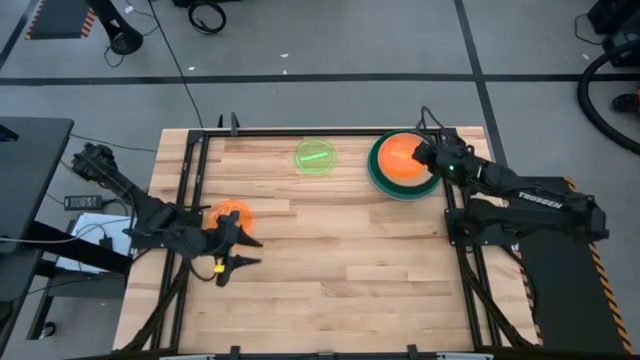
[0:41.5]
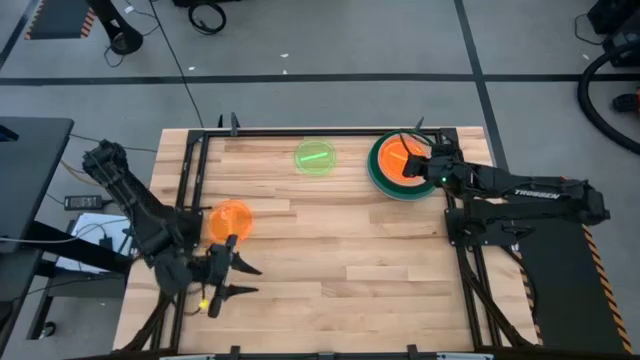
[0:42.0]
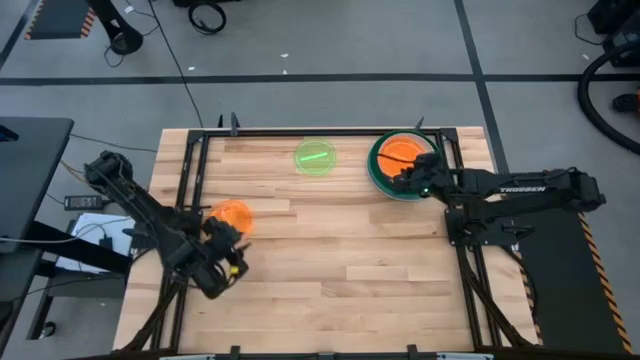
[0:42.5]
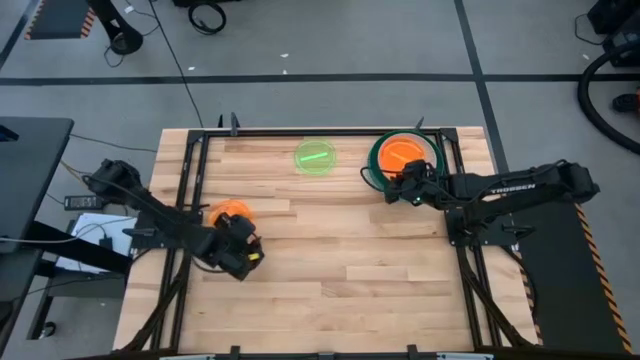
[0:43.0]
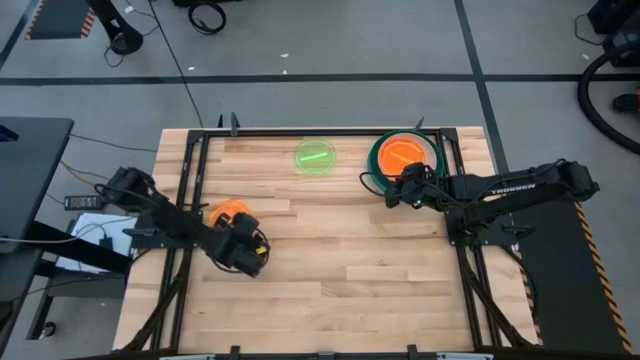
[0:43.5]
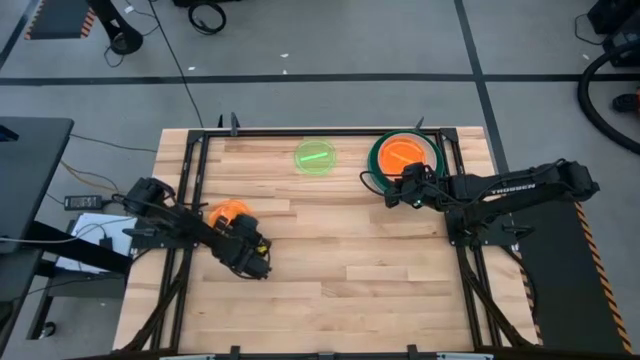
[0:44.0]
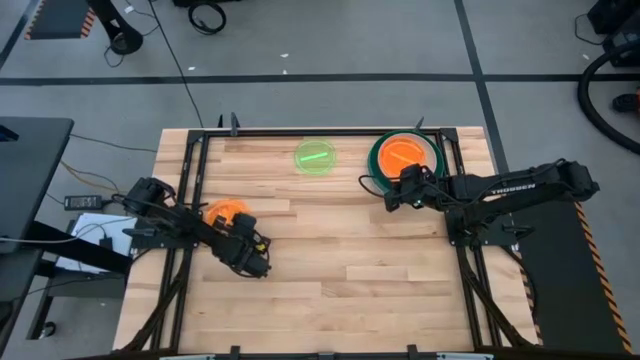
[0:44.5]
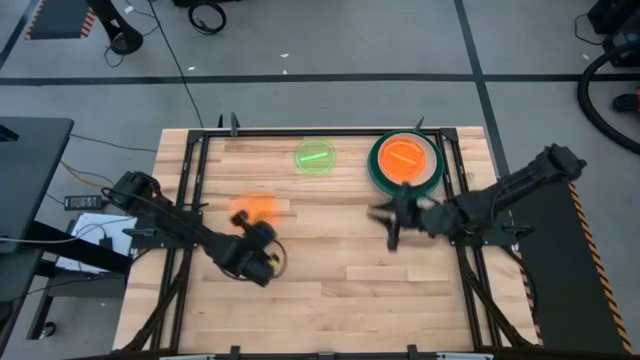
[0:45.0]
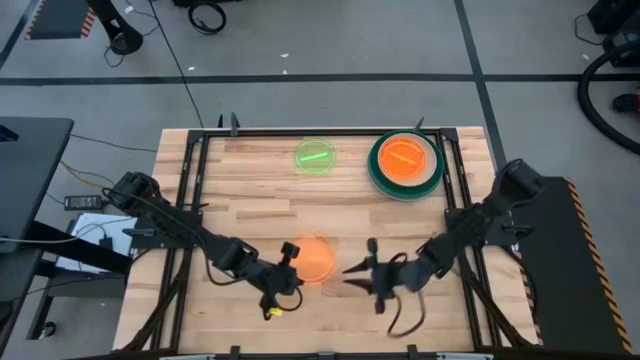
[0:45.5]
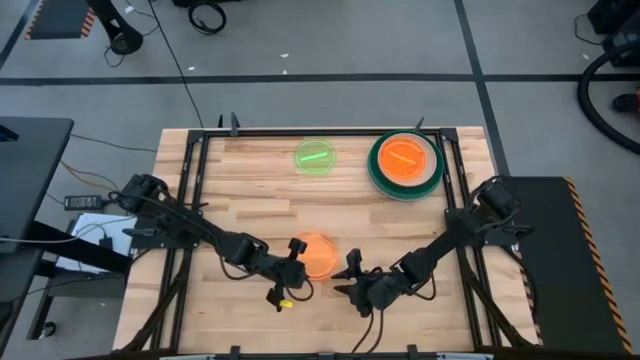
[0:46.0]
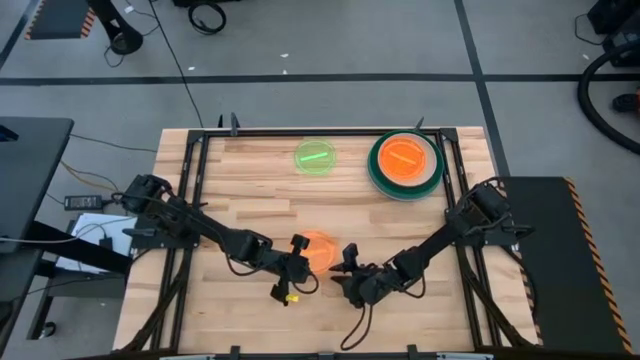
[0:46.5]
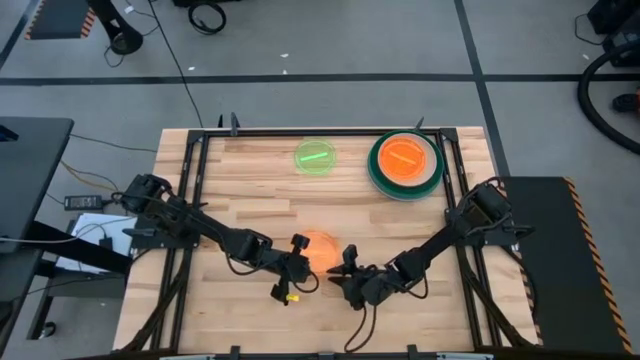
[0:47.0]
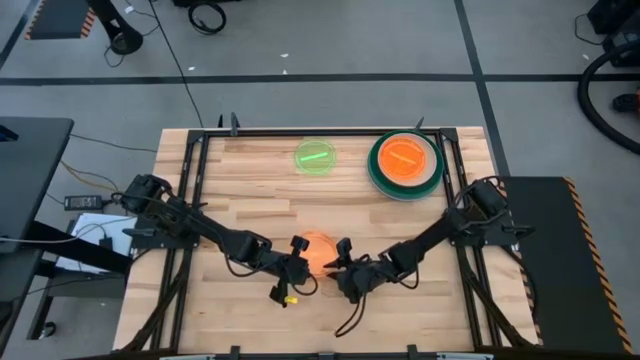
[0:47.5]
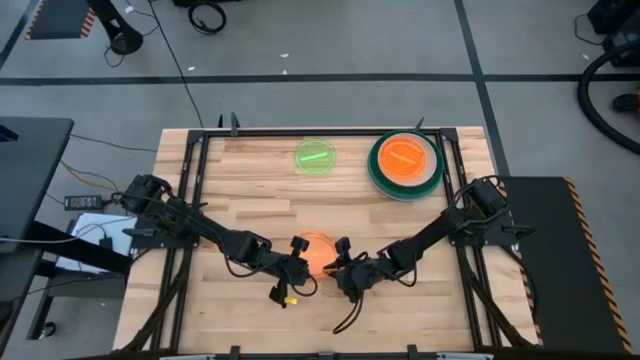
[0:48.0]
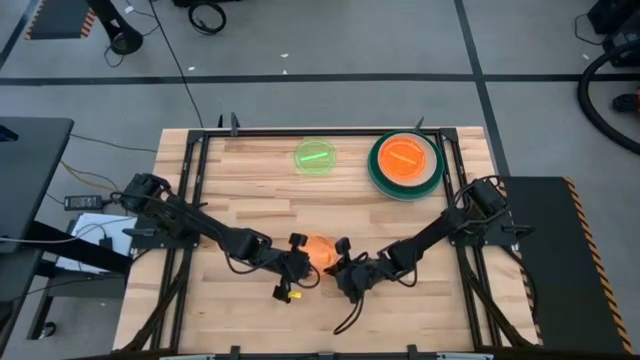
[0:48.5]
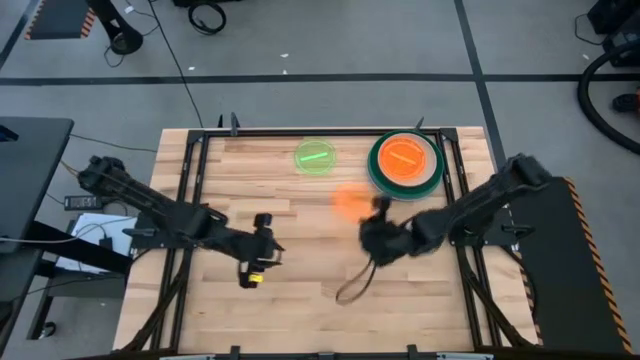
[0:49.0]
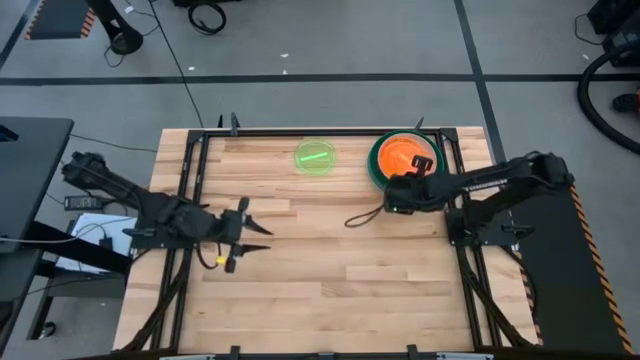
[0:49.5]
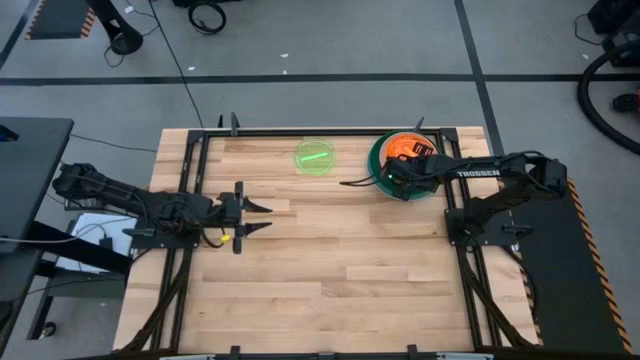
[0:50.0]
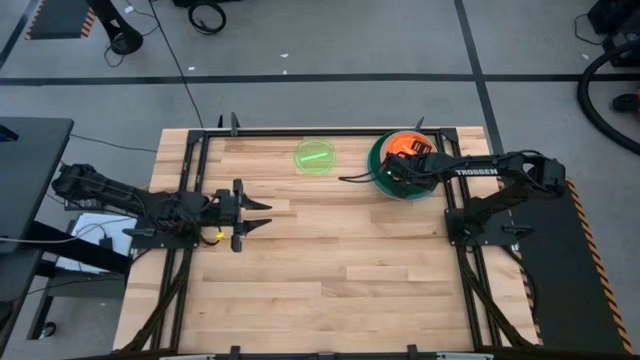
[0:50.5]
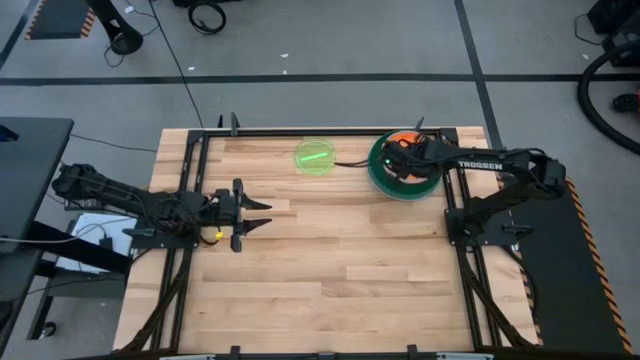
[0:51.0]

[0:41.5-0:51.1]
Task: Stack plastic plates
Stack the left light orange plate on top of the right light orange plate

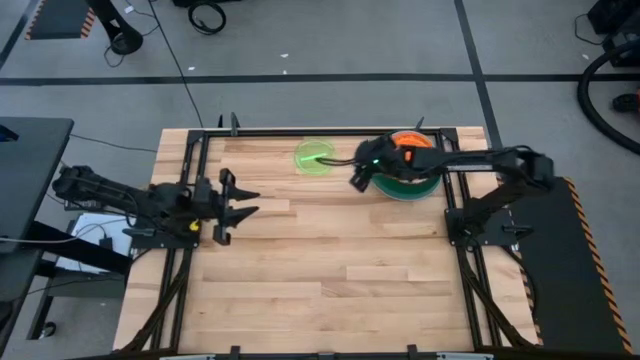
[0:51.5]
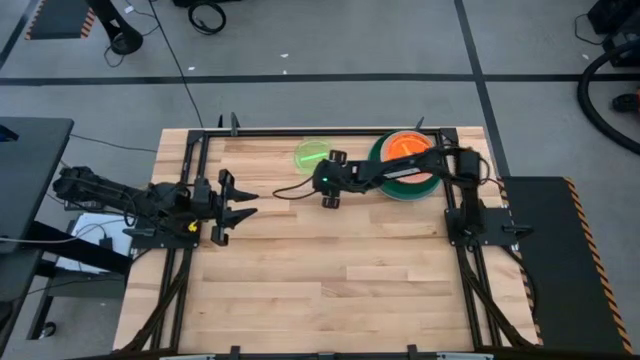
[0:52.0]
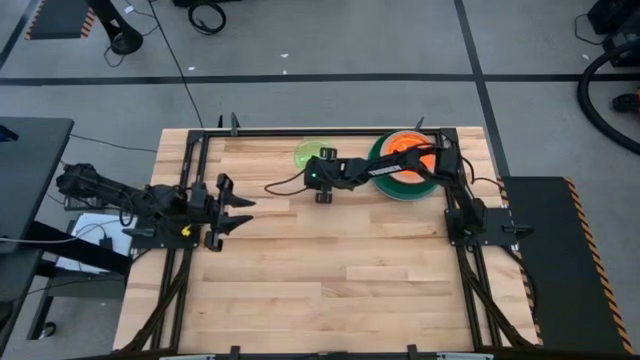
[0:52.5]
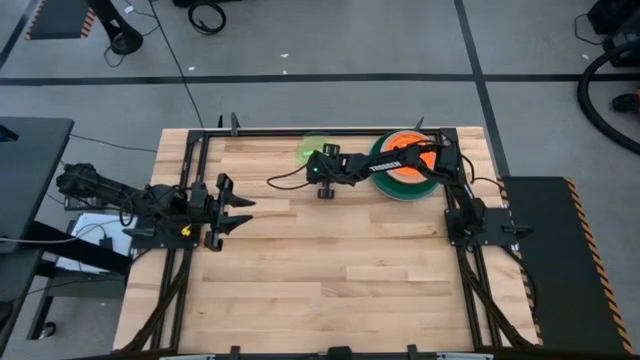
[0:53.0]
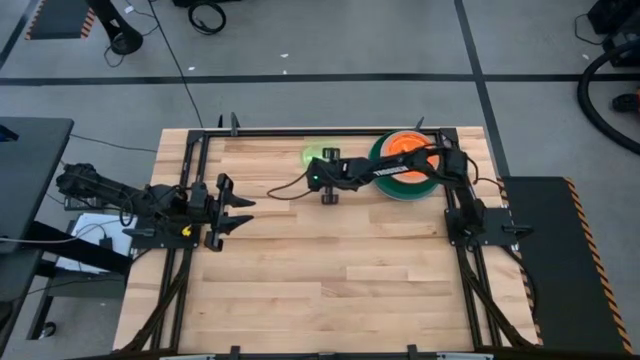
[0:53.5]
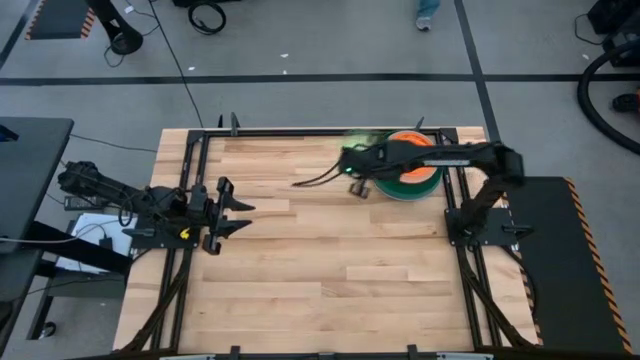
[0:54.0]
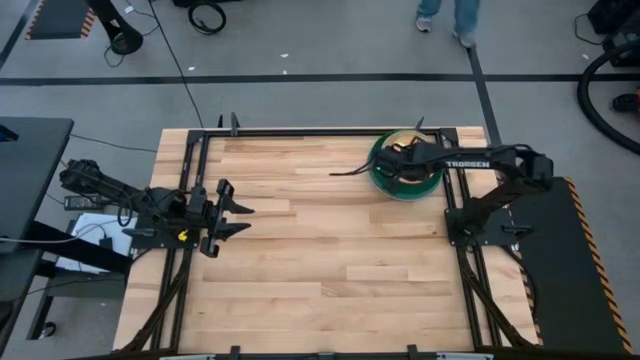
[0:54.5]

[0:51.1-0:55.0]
Stack the light green plate on top of the light orange plate

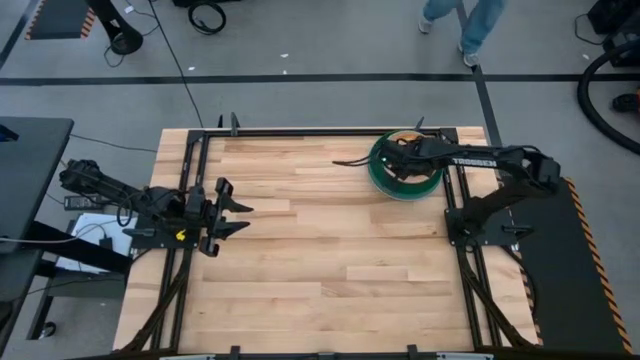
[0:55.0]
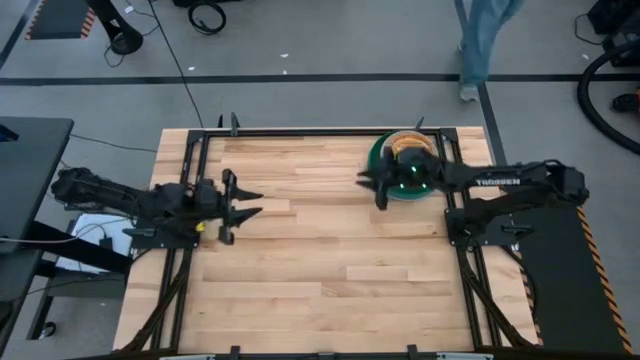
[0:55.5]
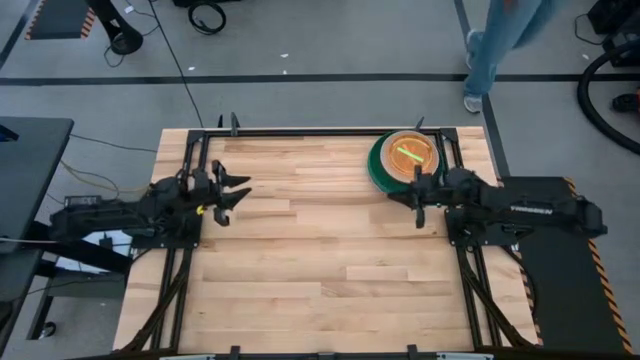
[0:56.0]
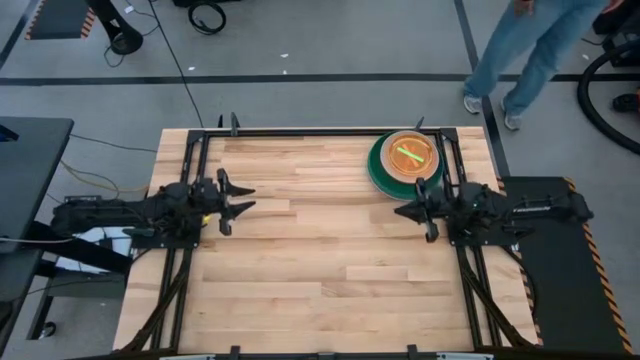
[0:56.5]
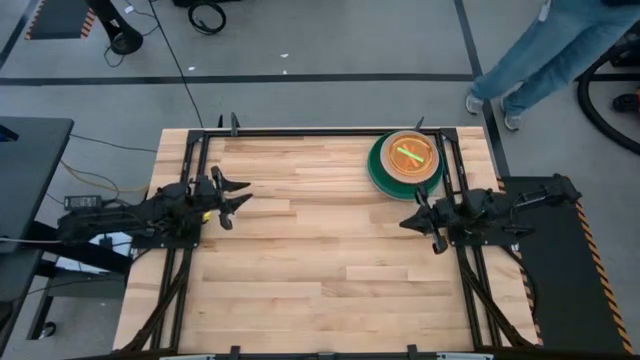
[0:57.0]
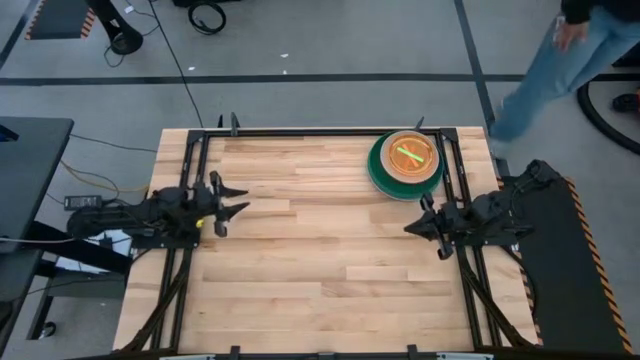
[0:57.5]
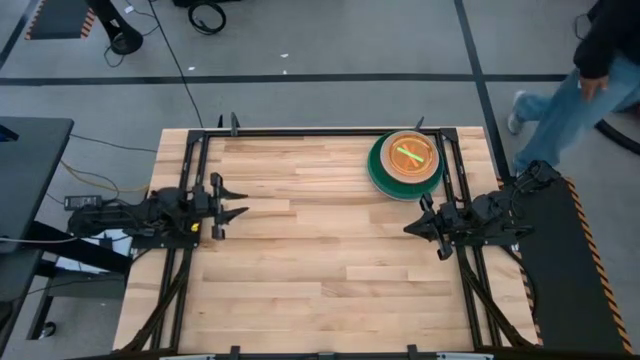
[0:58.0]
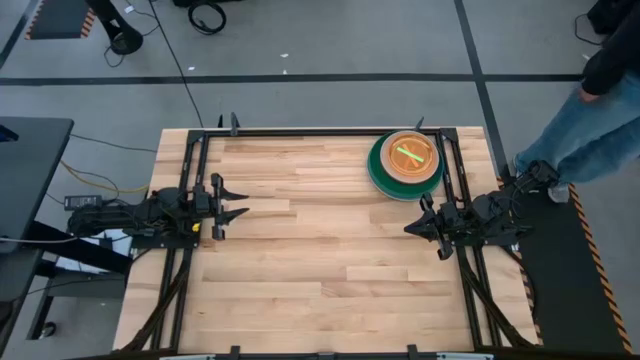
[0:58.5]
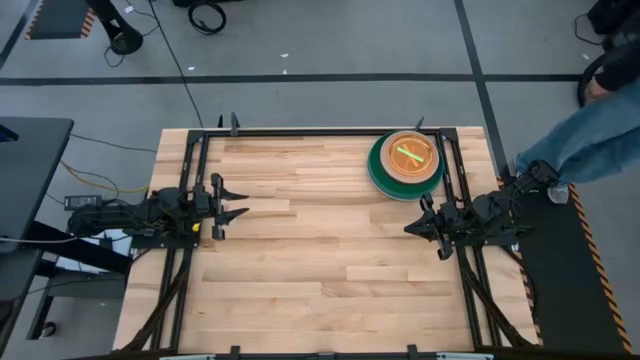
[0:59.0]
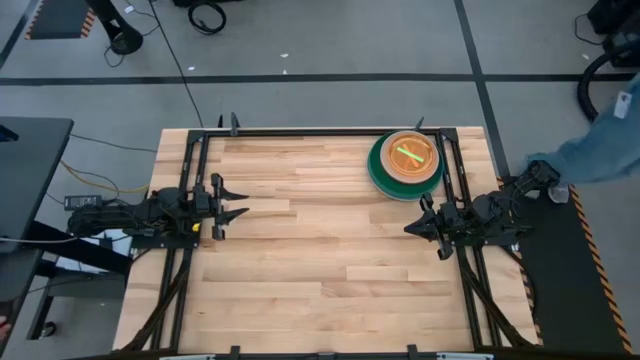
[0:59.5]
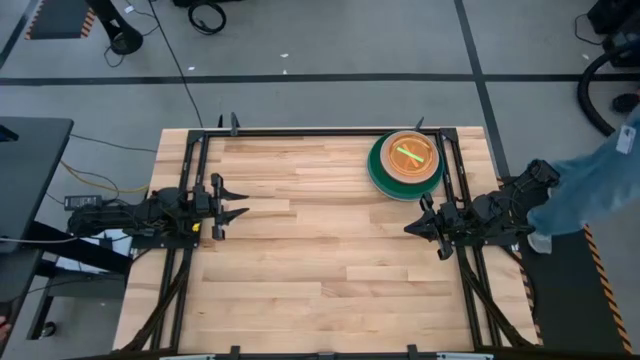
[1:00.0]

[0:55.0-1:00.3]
Return to Home Position
